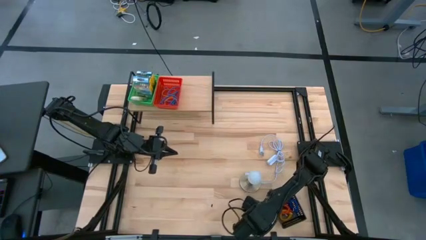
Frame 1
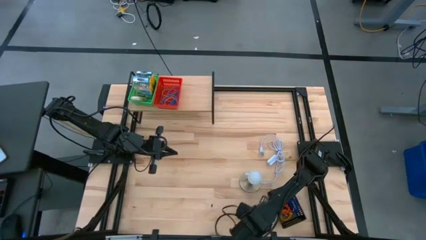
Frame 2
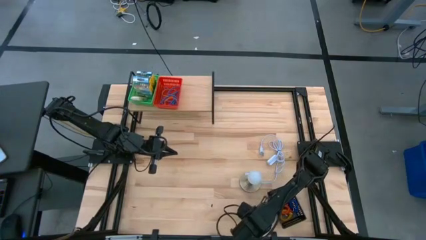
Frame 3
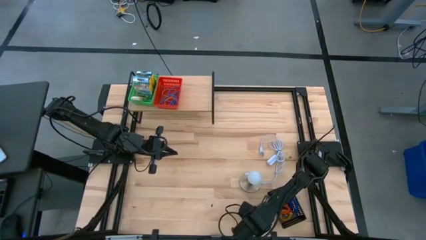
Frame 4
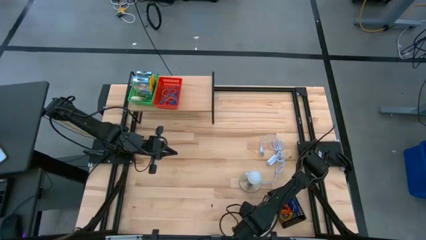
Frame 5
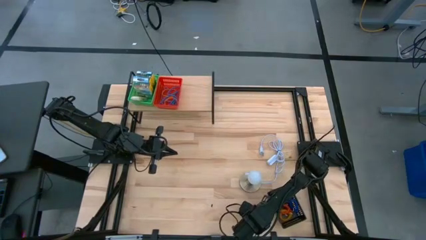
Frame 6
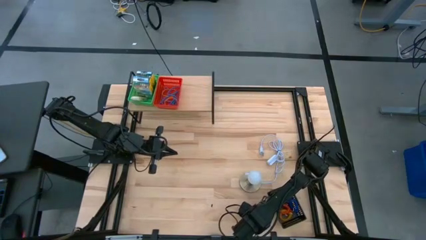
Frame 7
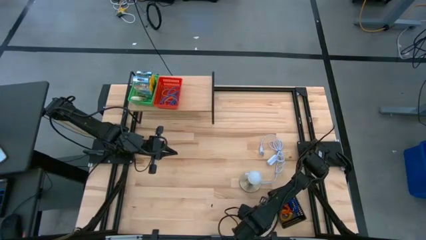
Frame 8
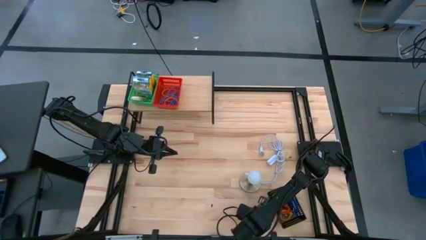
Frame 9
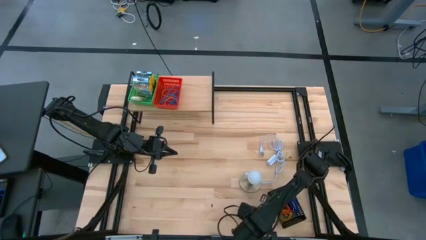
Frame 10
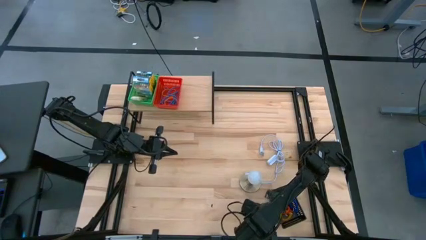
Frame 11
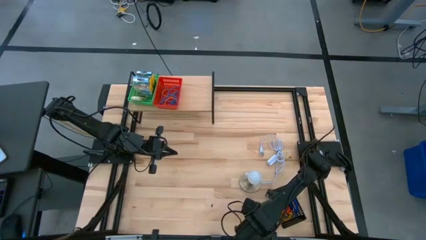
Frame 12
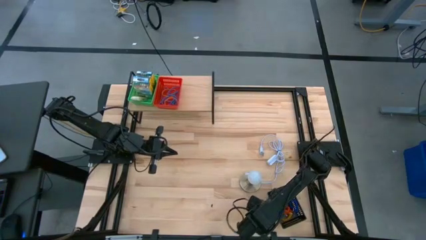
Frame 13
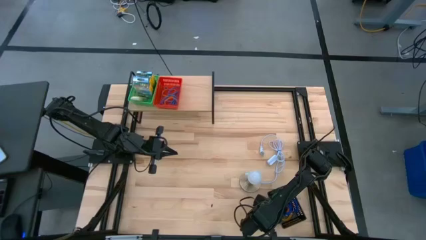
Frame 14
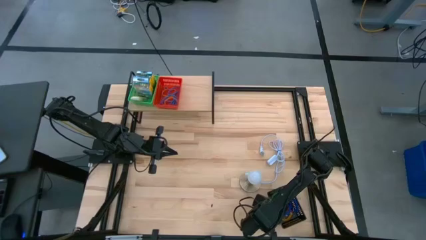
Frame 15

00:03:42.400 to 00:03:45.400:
Task: Pick & Place Office Desk Supplies
Put the blue spring keychain into the black basket

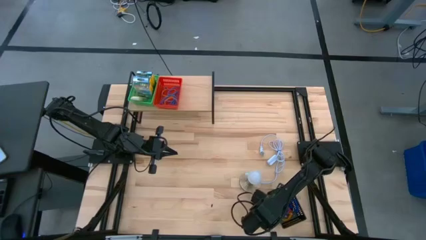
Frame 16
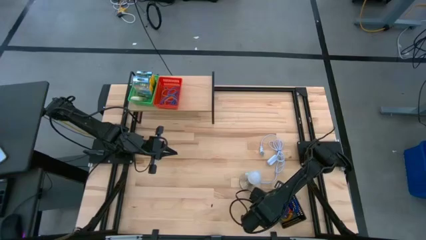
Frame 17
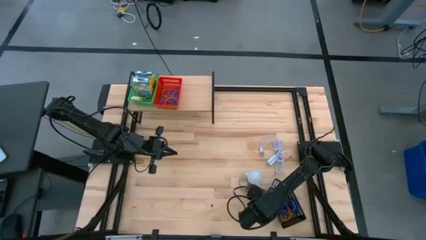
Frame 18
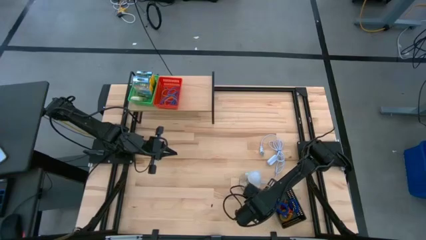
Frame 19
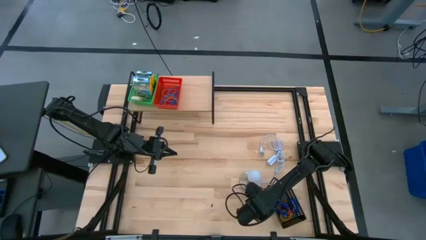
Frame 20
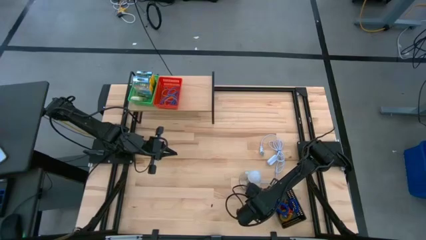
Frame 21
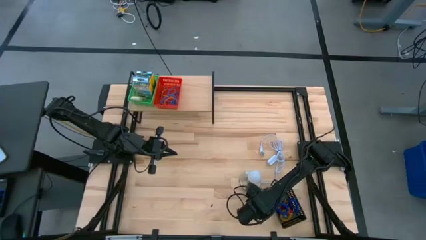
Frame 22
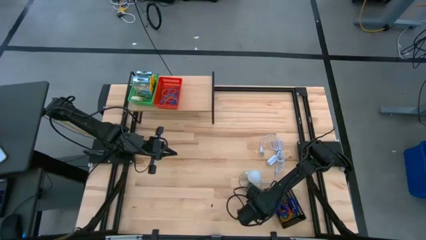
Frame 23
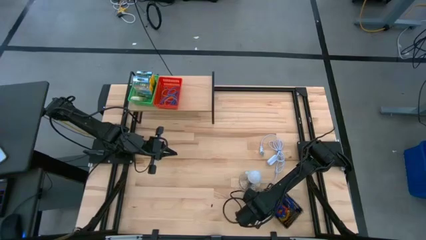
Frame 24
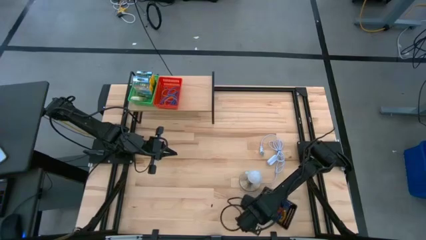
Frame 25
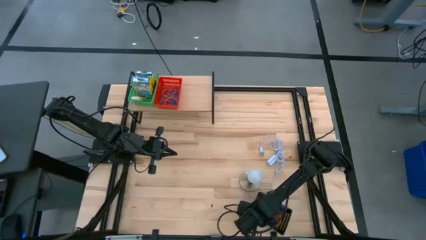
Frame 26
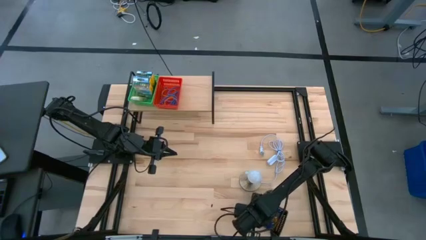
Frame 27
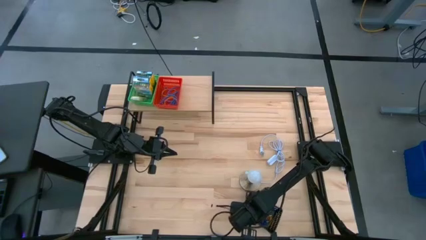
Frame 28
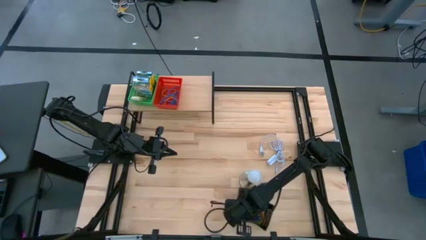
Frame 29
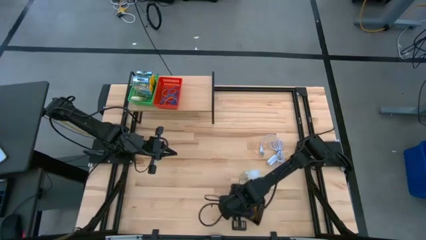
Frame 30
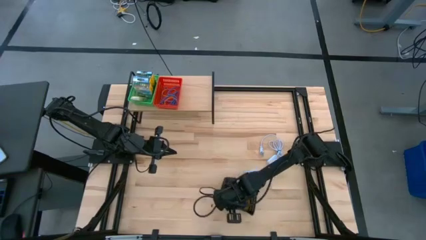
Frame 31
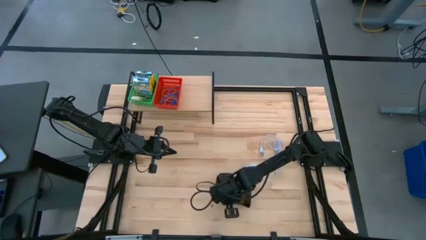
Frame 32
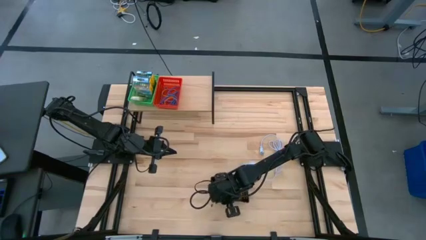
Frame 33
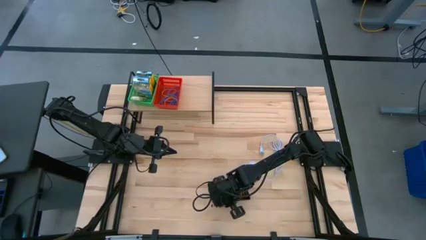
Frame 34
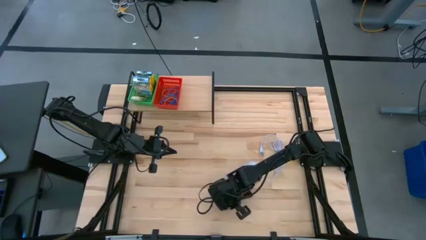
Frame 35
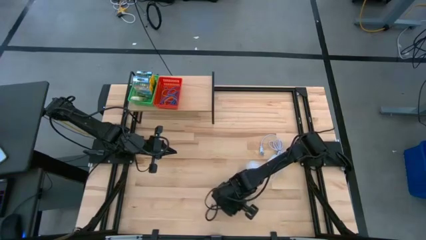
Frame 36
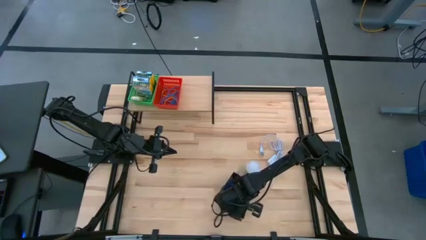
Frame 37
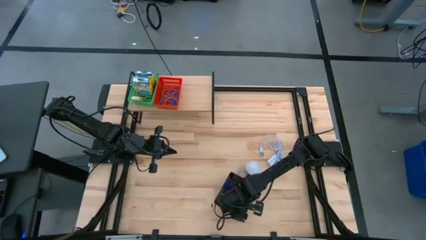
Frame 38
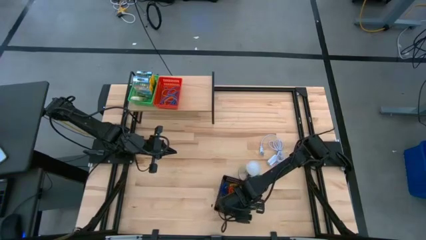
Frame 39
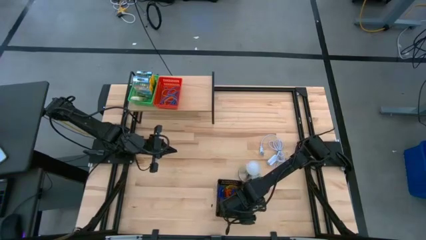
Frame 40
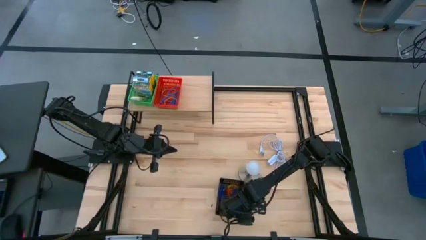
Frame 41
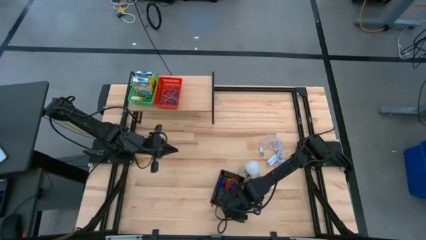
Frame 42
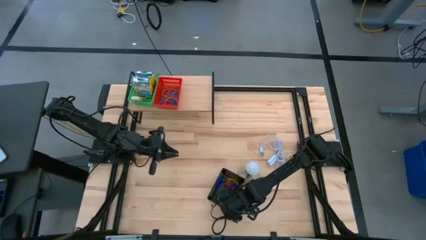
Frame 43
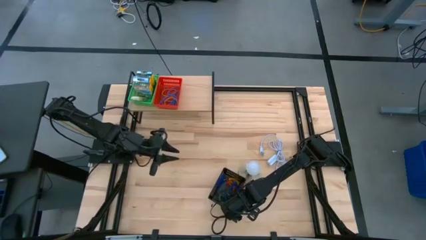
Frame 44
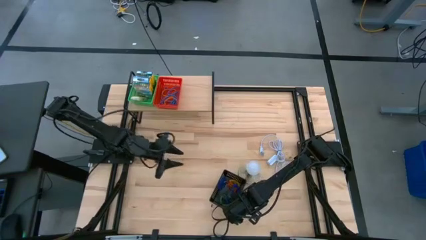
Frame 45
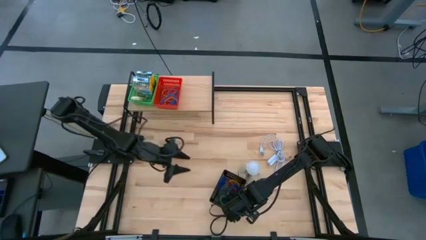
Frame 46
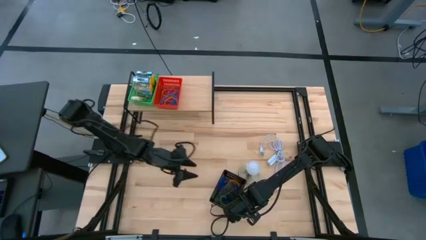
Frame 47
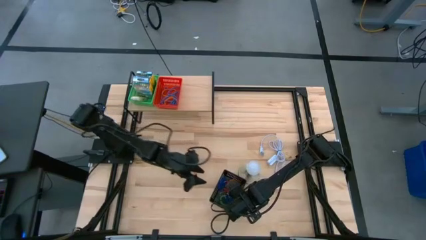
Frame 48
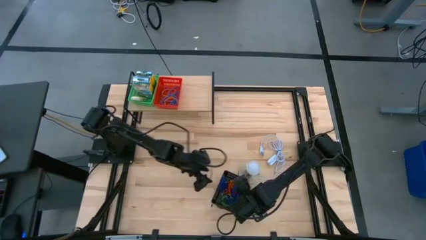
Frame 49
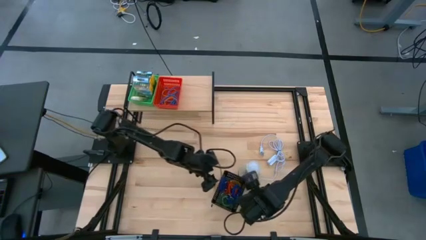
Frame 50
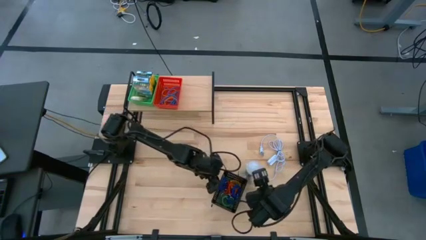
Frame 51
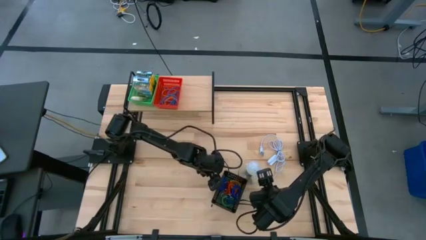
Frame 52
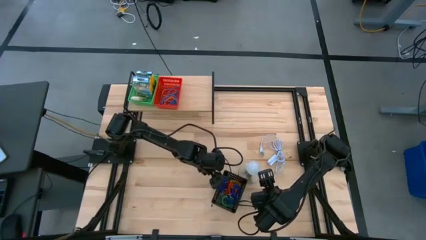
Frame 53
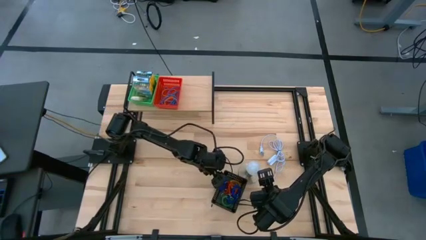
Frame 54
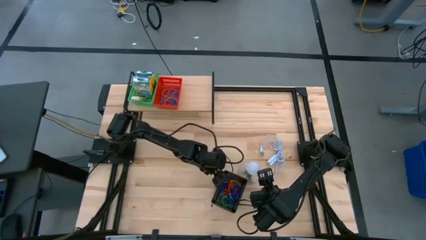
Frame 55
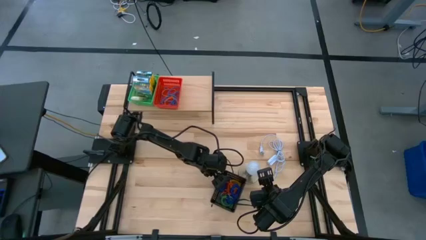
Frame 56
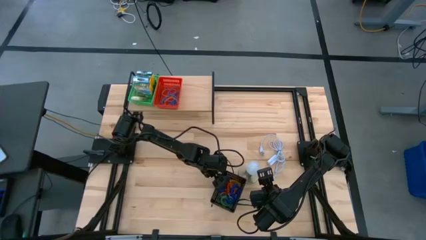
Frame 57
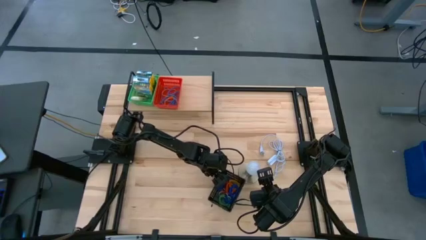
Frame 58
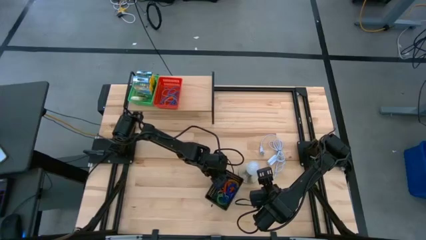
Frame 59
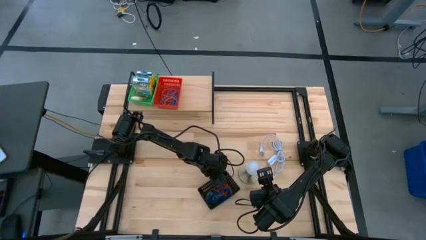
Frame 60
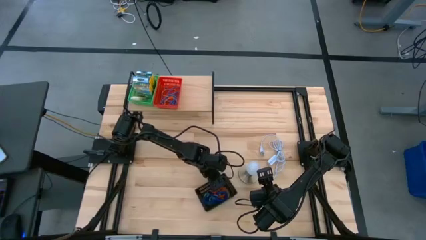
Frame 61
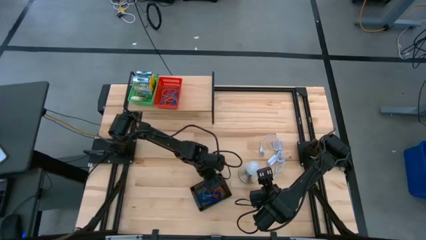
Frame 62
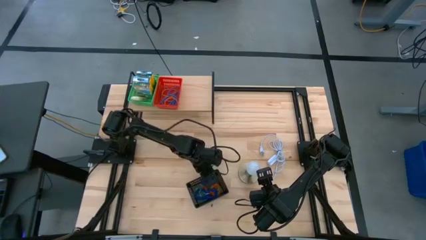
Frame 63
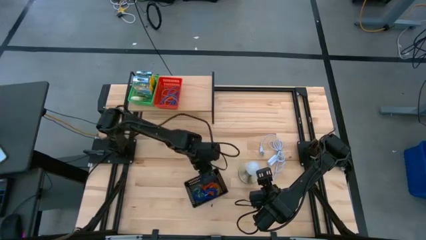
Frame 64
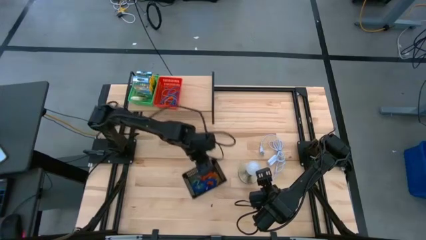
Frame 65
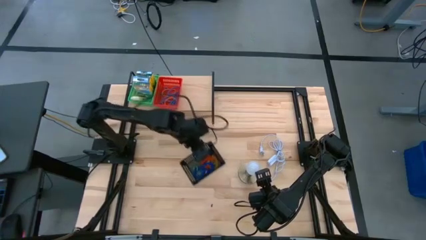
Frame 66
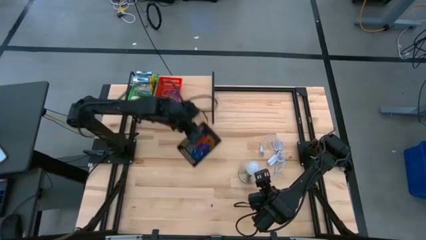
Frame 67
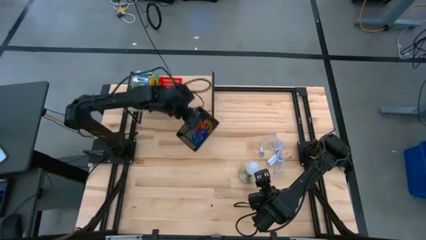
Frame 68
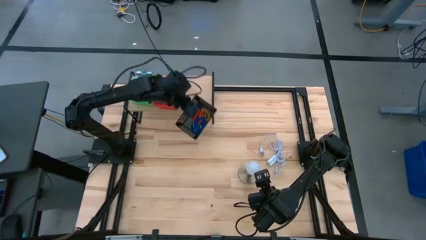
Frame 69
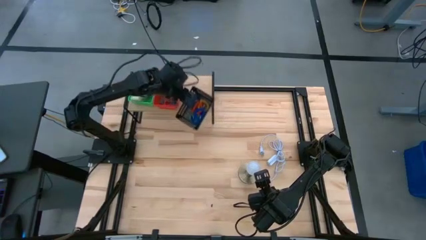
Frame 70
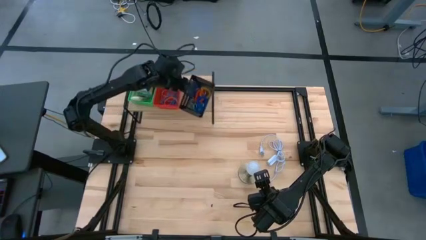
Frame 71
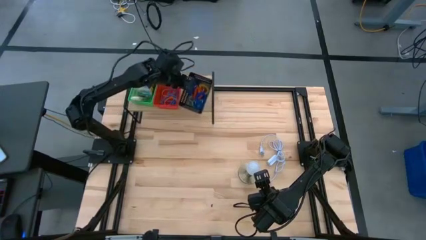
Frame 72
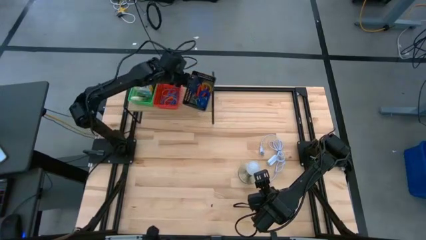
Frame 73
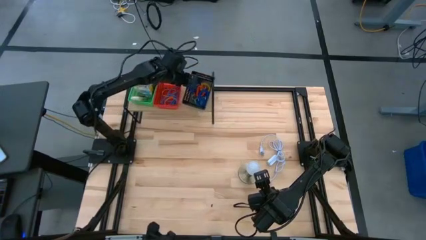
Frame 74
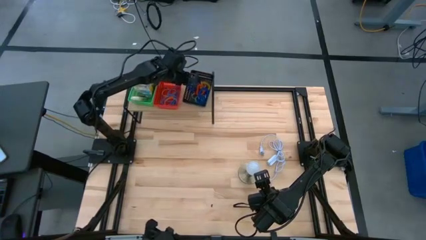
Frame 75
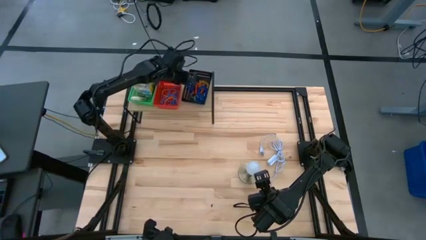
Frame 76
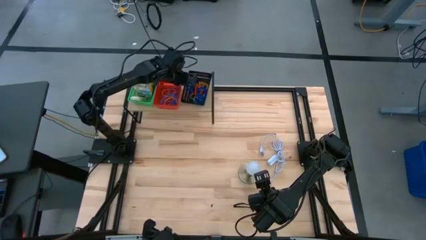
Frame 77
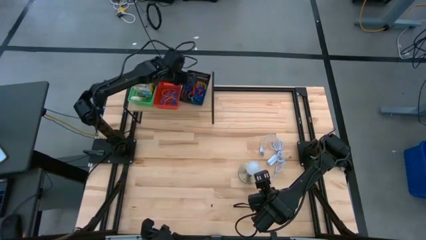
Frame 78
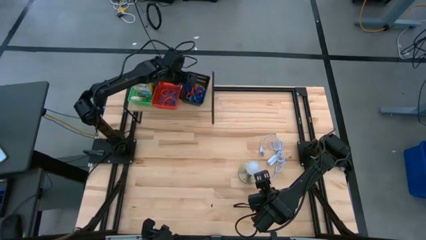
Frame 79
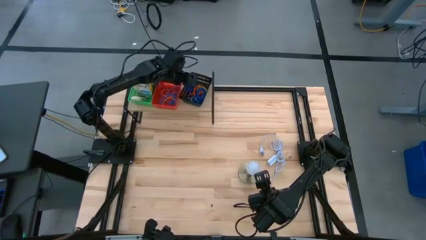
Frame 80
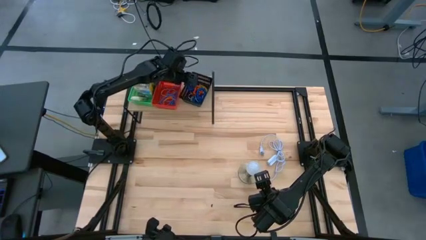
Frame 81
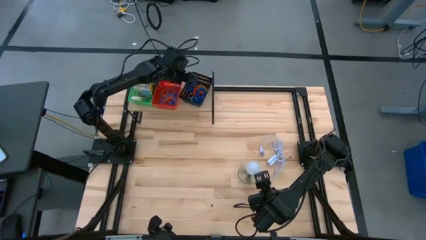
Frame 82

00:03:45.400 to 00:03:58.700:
Put the black basket on the shelf
